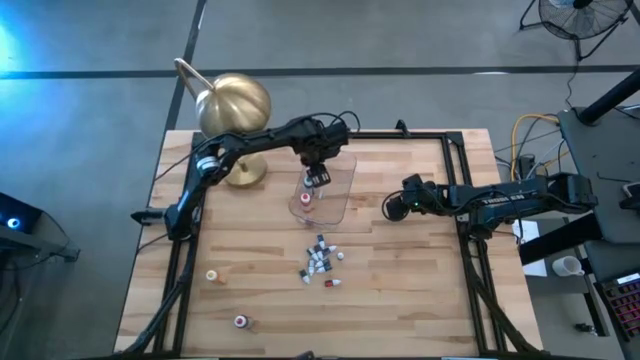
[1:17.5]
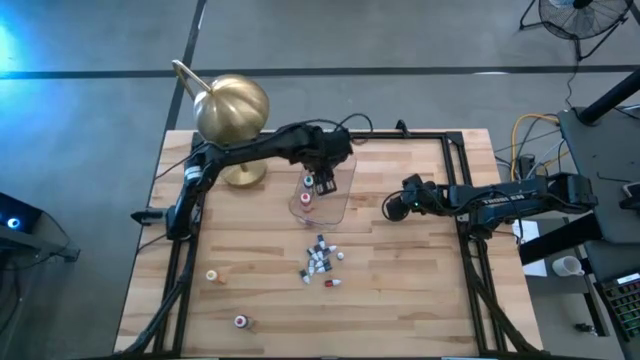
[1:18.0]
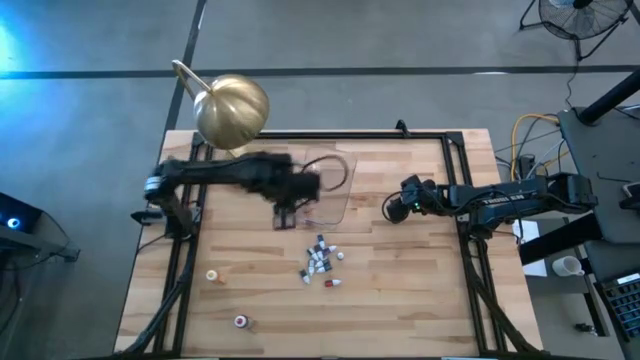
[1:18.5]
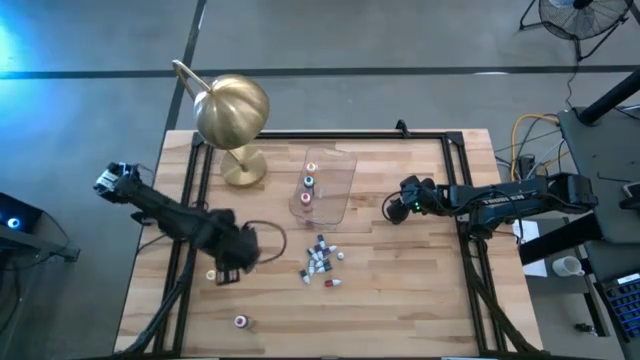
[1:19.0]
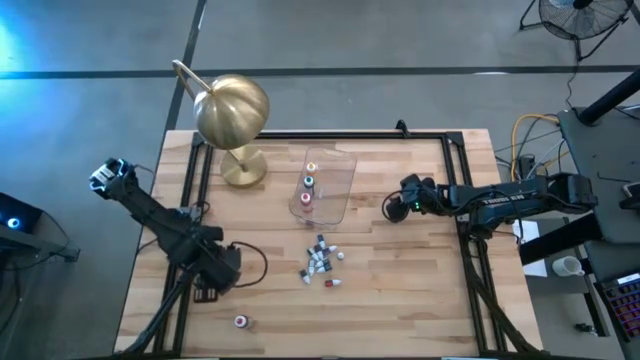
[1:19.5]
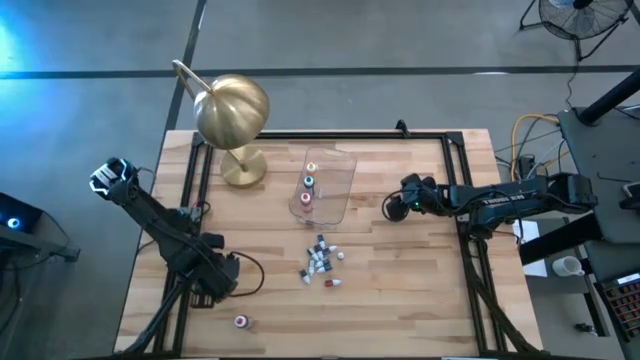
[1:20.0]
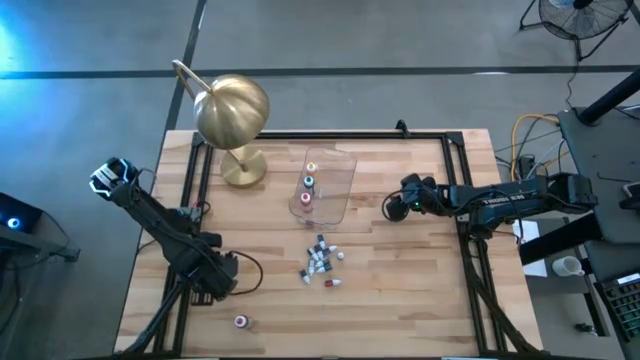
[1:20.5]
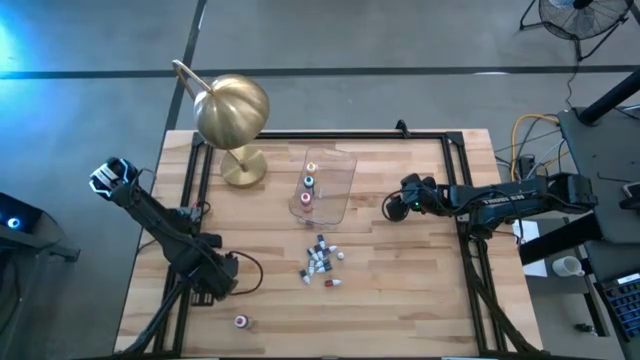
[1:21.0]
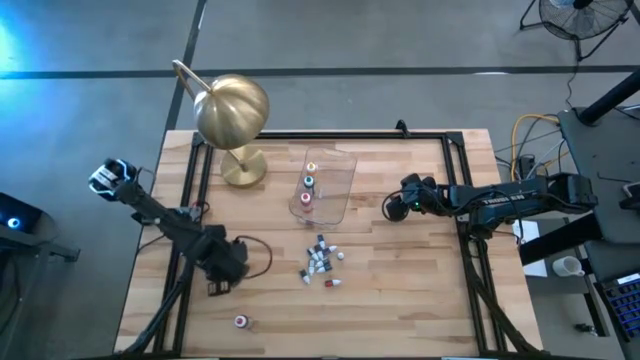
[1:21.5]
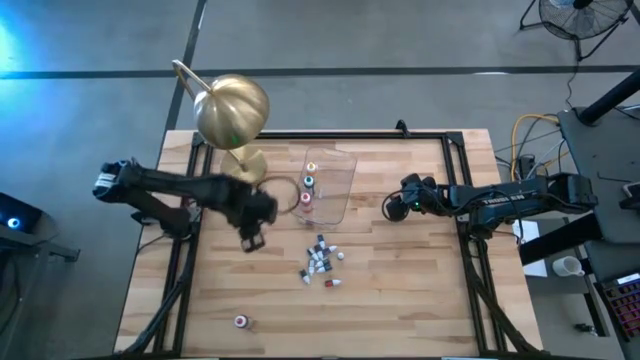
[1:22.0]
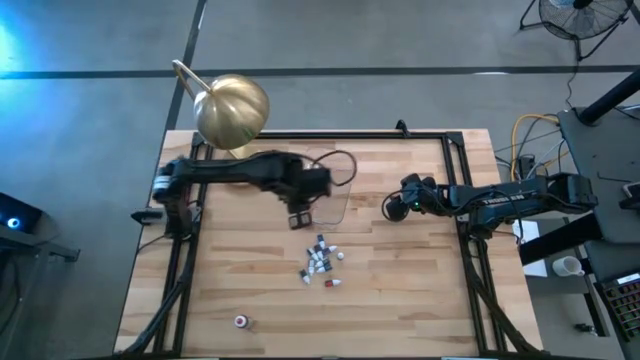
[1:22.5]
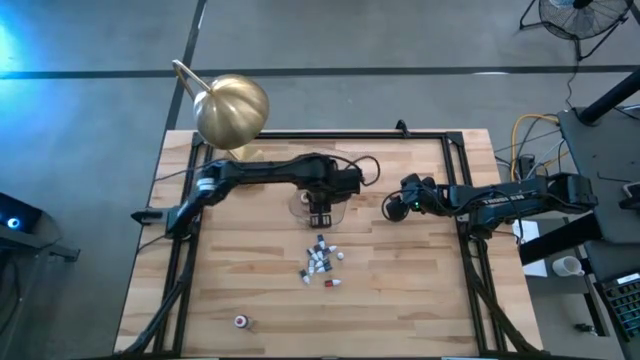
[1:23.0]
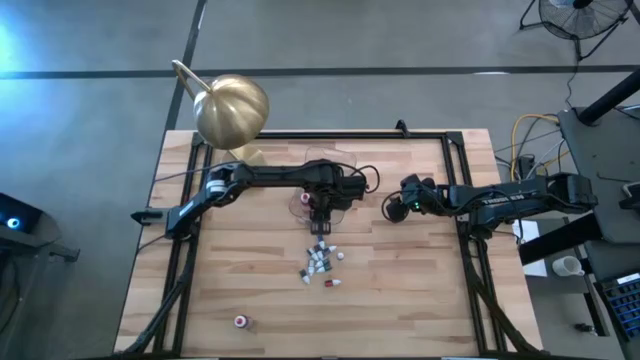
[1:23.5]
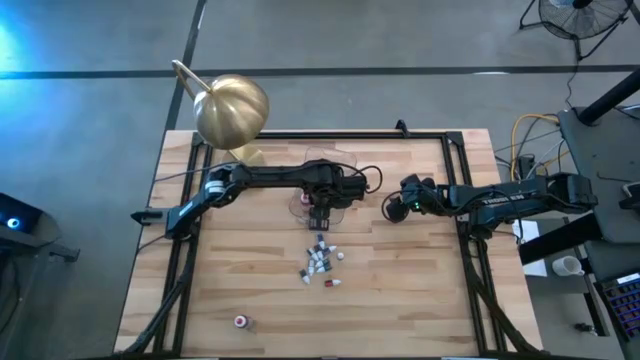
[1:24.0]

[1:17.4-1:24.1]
Task: Pick & Place food coloring
Put the large yellow food coloring bottle into the transparent bin

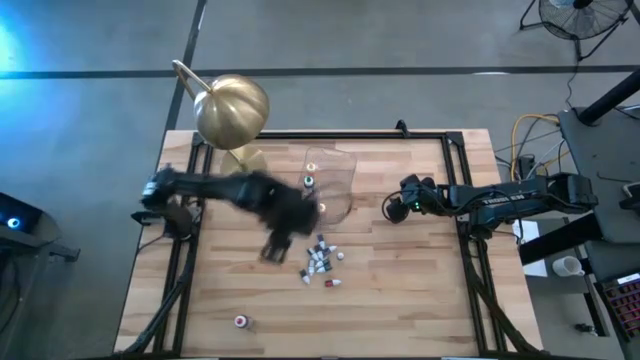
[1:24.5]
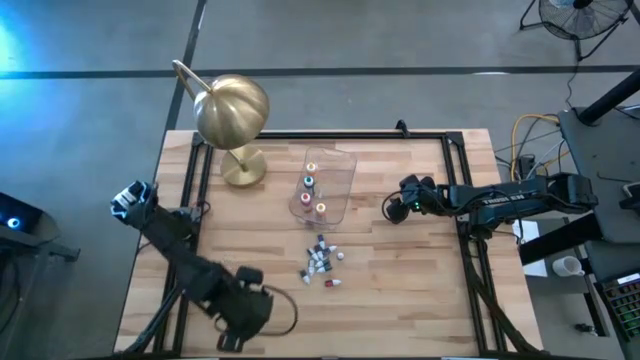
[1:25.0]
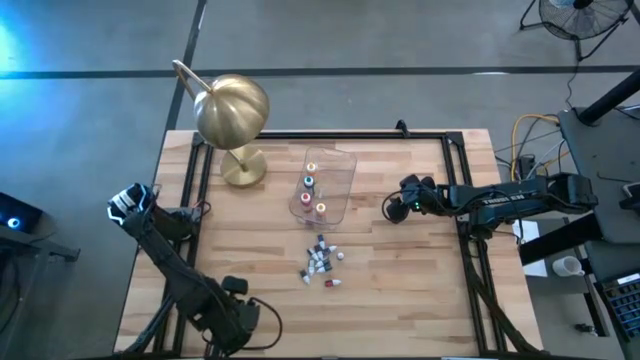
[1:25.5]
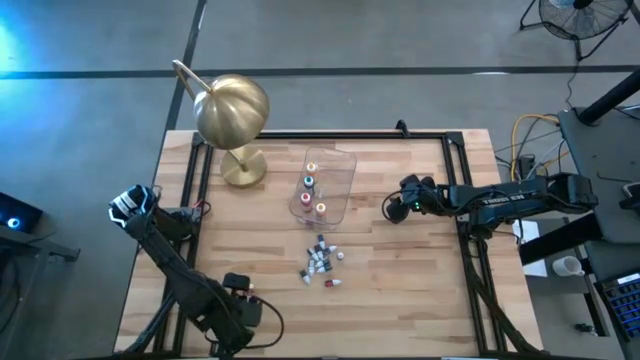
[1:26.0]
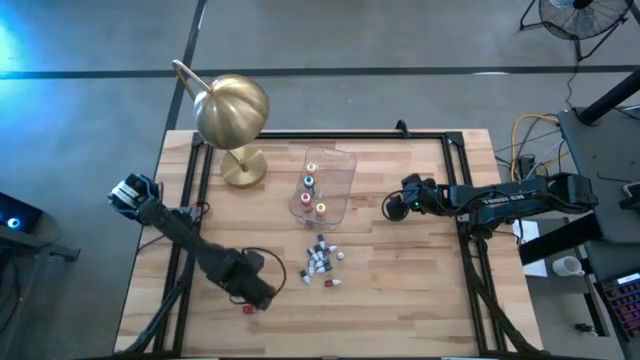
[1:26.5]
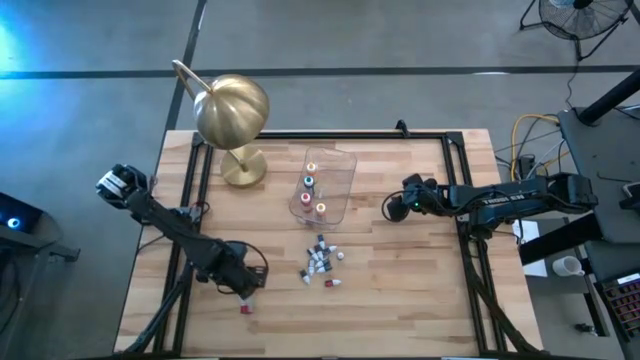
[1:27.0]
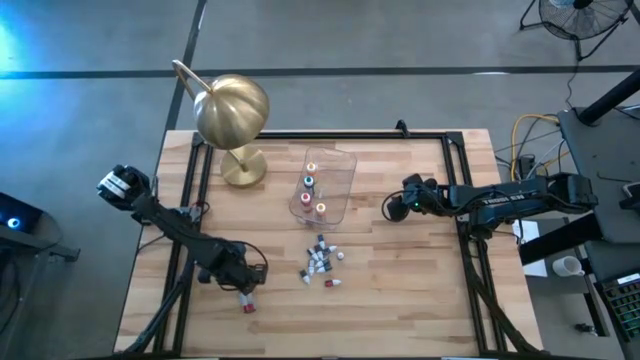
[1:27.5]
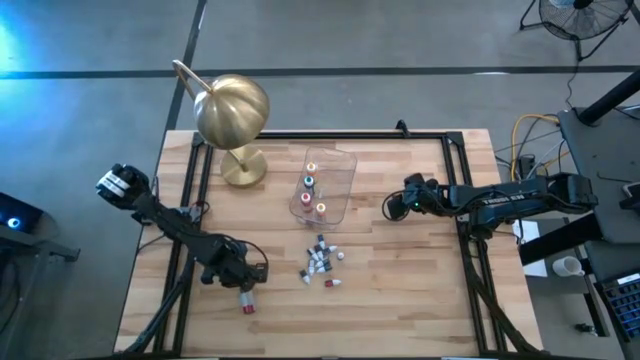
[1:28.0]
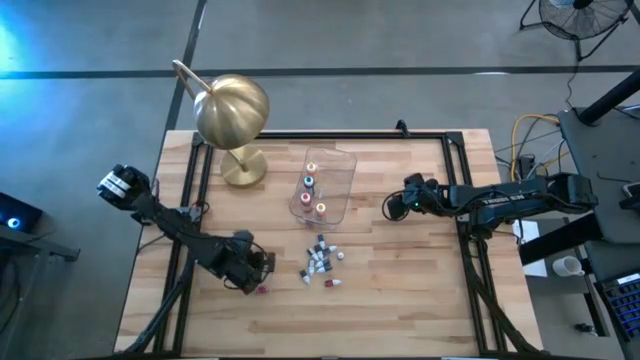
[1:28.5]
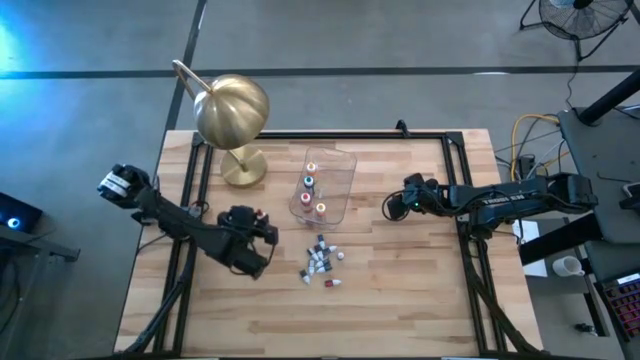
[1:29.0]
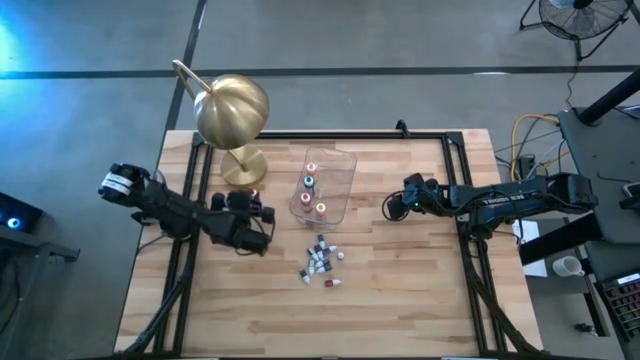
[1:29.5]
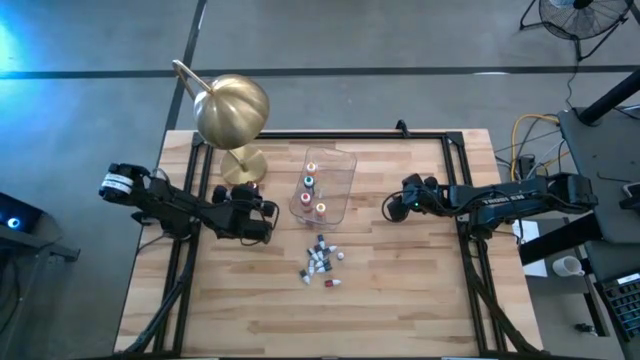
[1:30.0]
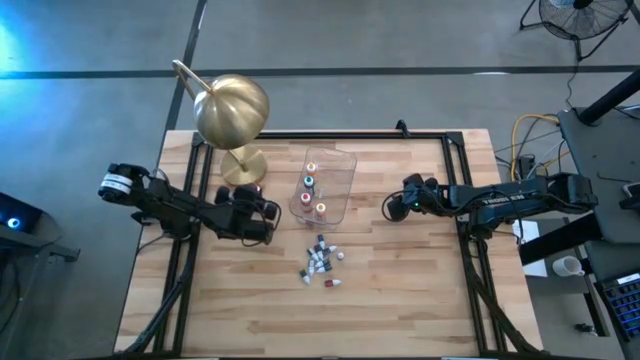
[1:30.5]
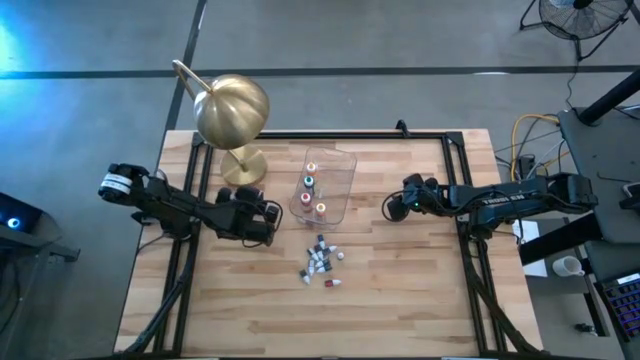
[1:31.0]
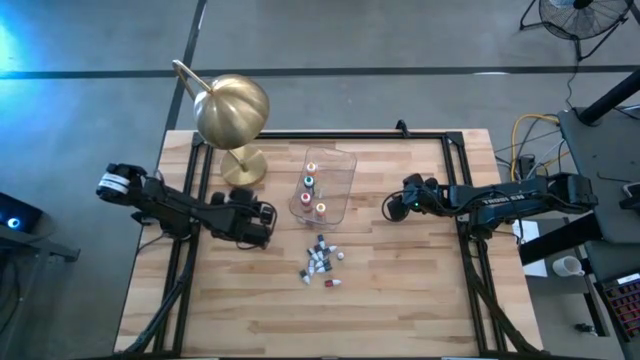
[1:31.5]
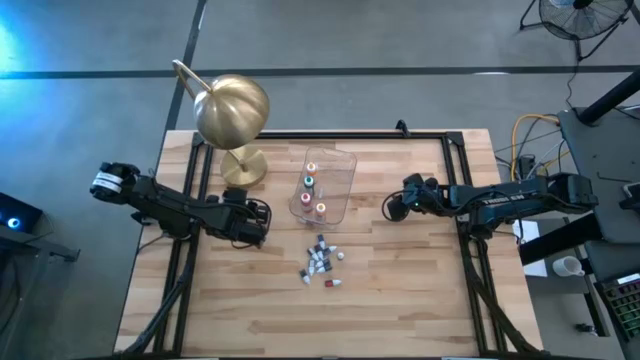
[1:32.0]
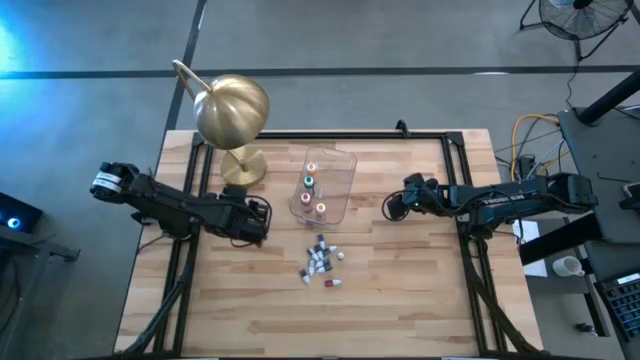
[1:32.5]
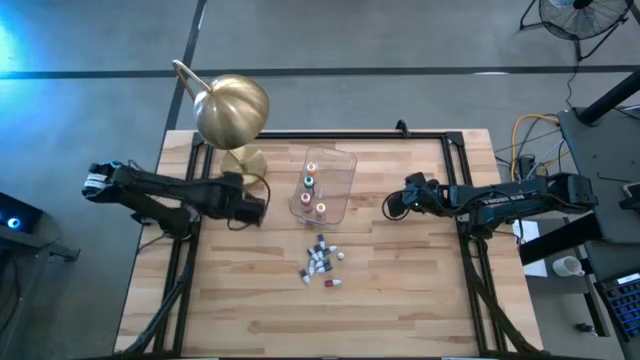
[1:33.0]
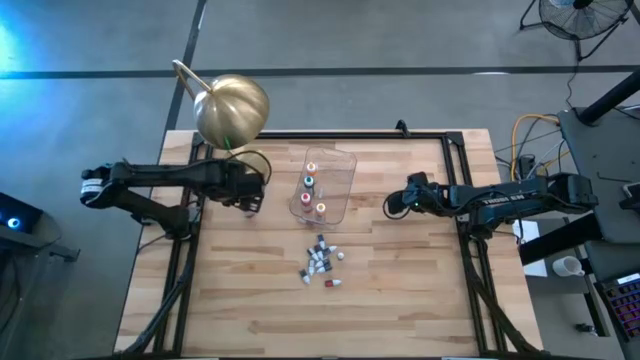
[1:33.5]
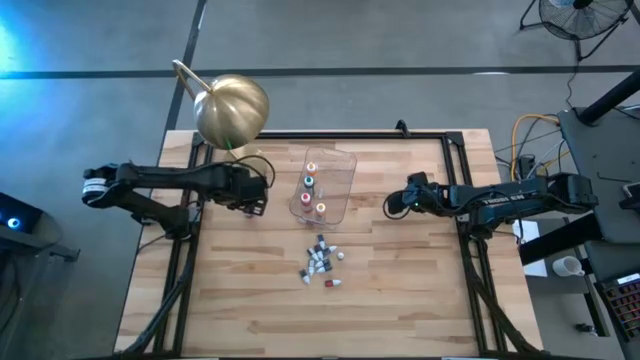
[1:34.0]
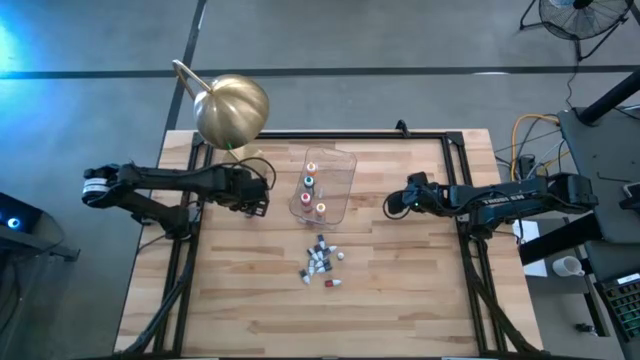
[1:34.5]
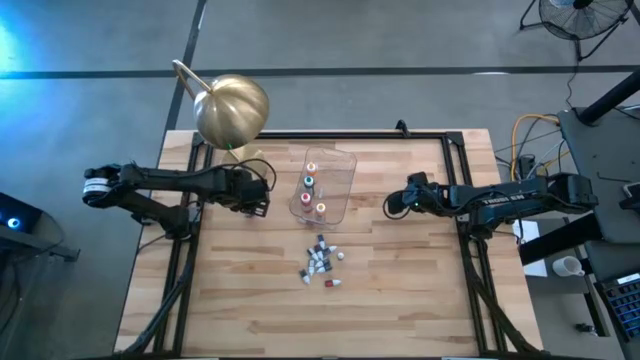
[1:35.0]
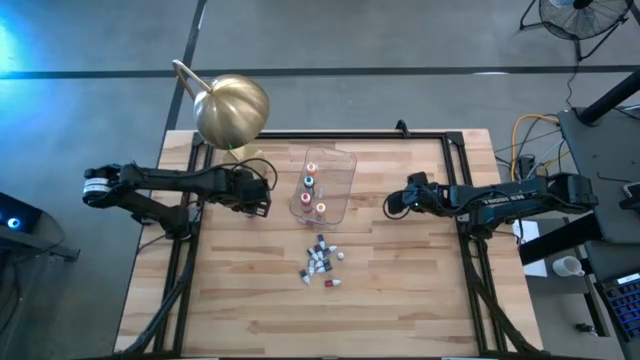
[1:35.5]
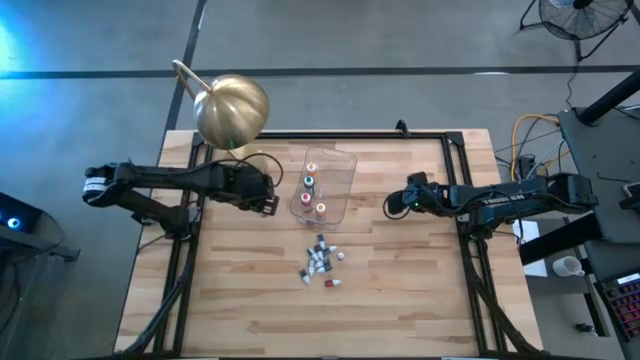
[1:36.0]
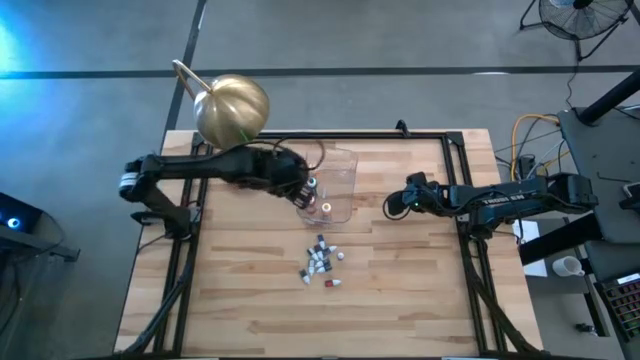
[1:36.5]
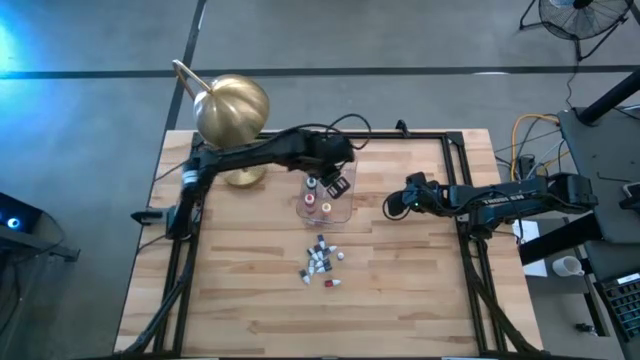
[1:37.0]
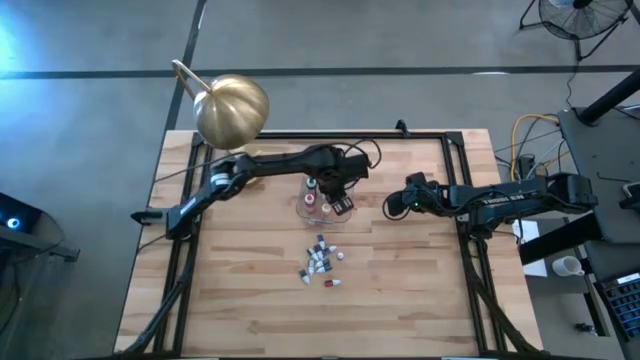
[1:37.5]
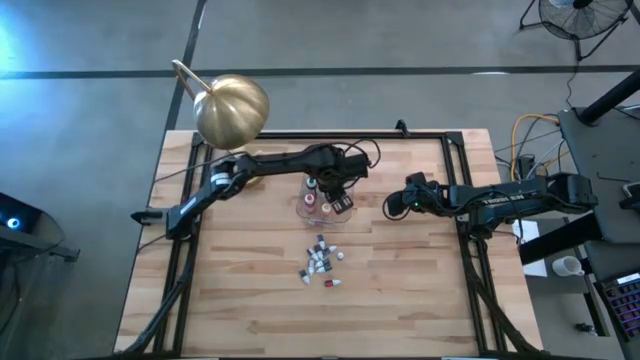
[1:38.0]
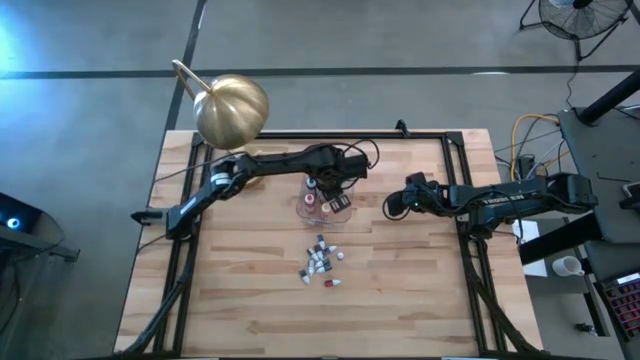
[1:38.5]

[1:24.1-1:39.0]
Put the large red food coloring bottle into the transparent bin
